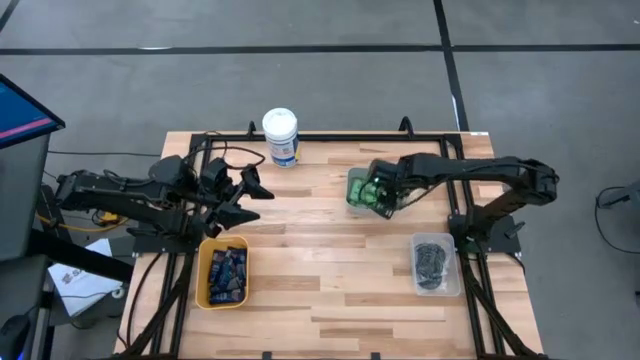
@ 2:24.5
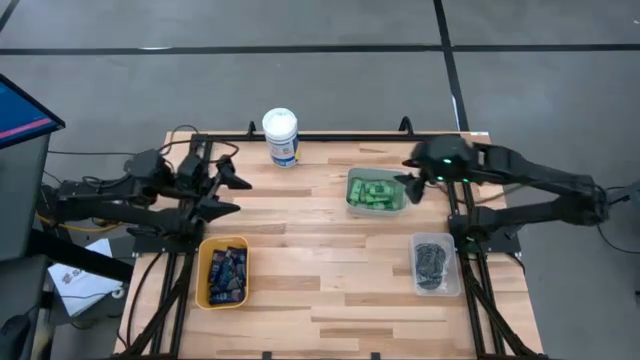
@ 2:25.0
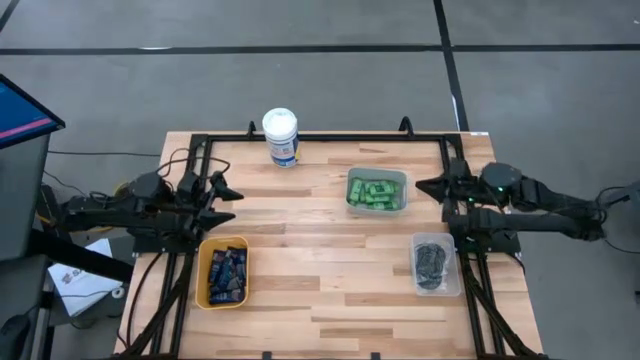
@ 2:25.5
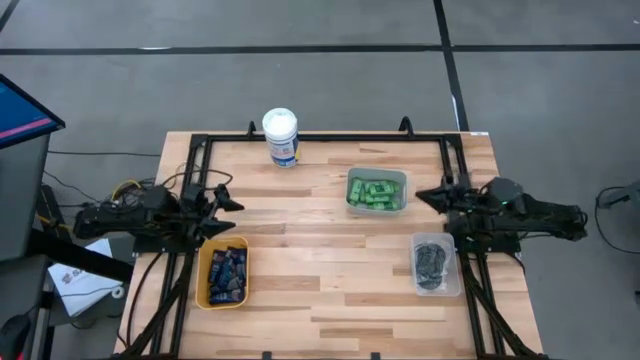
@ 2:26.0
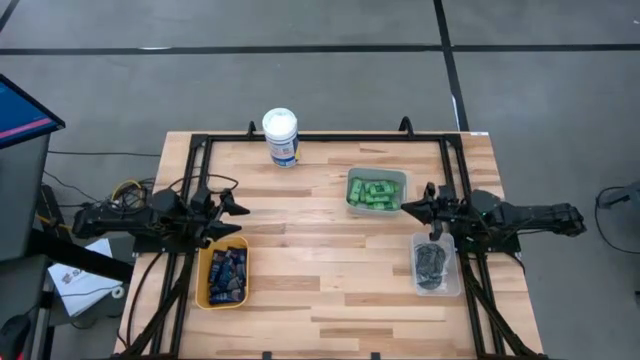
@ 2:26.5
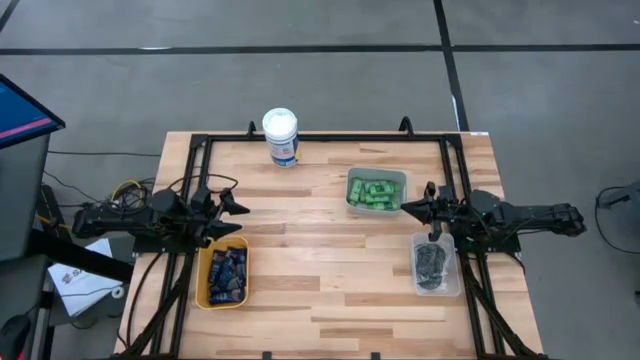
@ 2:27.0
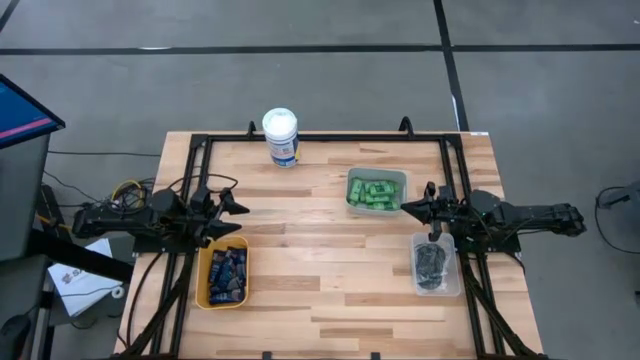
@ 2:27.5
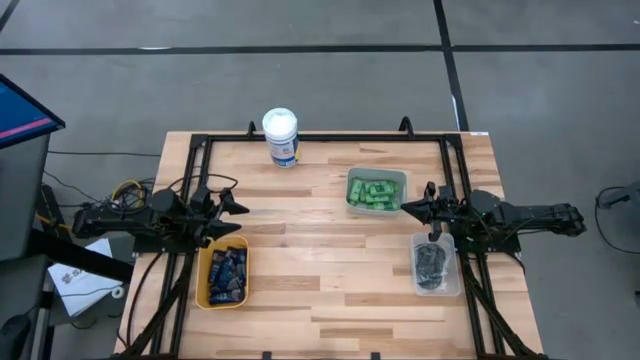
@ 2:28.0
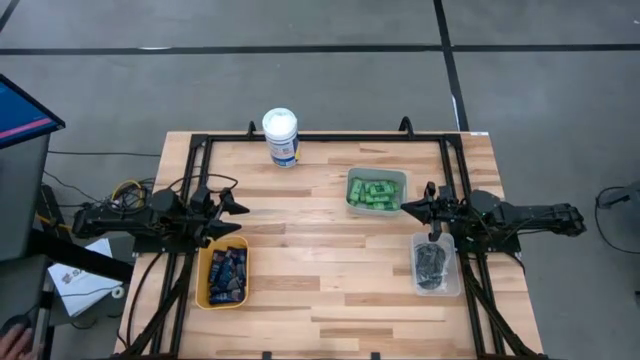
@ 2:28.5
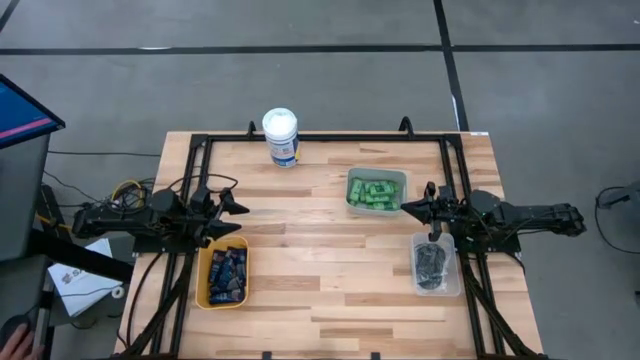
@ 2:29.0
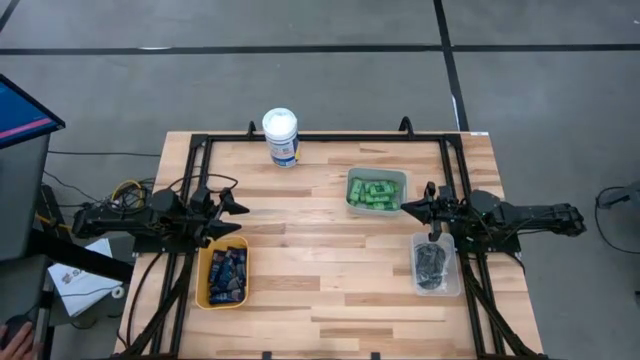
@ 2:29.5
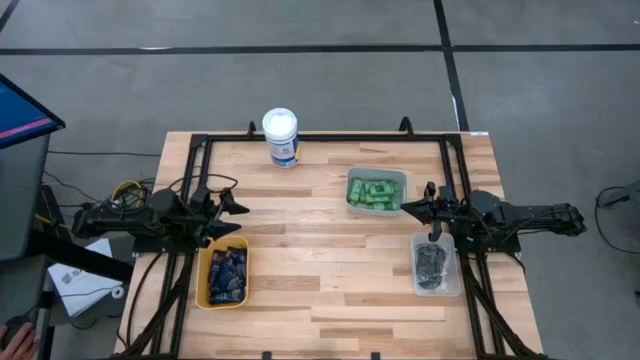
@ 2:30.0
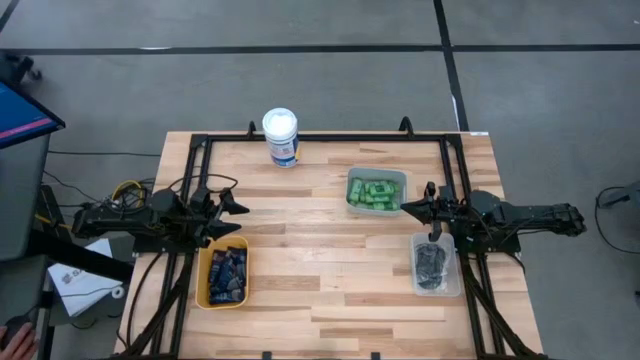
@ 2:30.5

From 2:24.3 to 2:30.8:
Task: Pick & Place Travel size toiletries
Return to Home Position

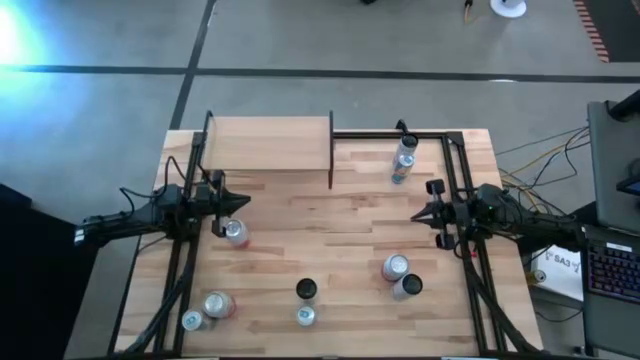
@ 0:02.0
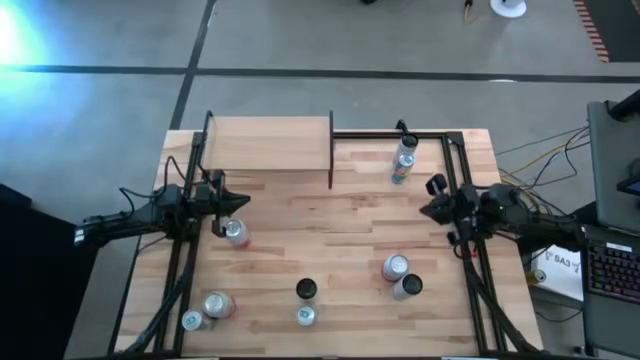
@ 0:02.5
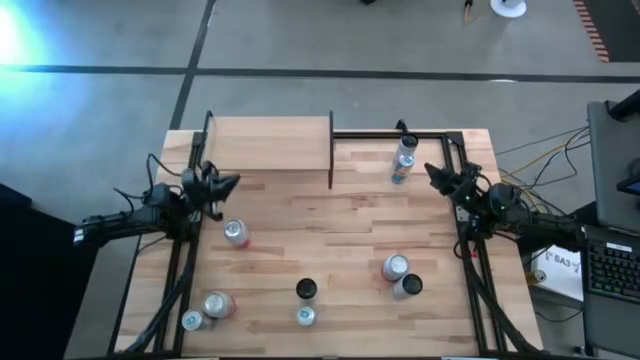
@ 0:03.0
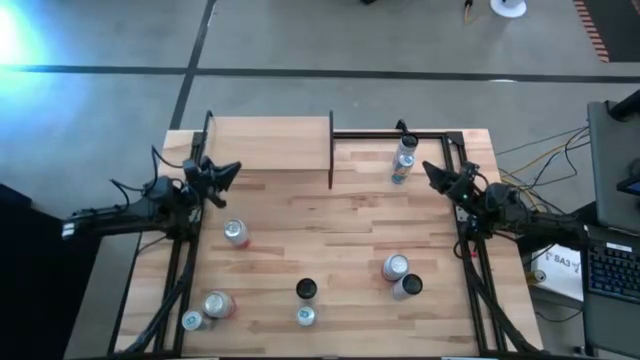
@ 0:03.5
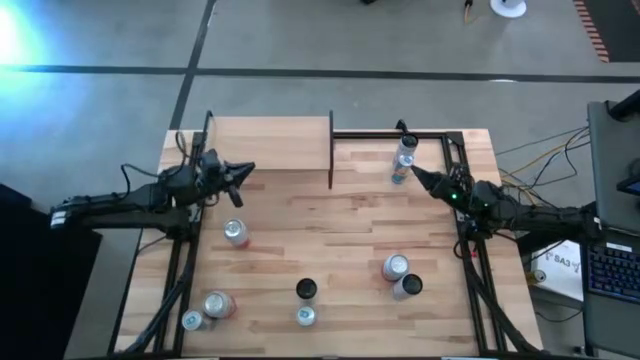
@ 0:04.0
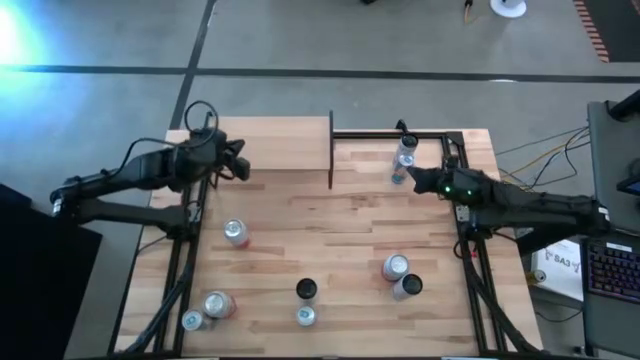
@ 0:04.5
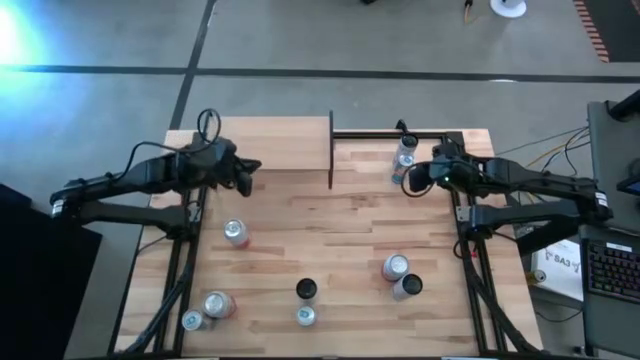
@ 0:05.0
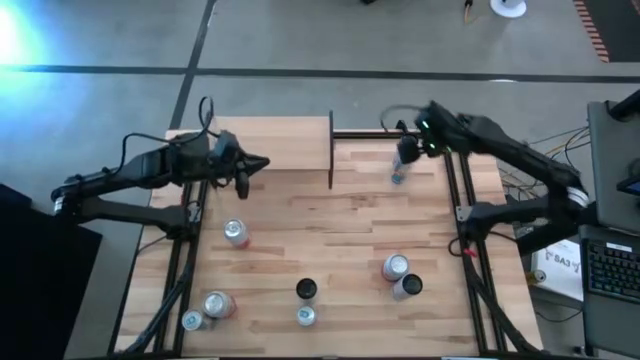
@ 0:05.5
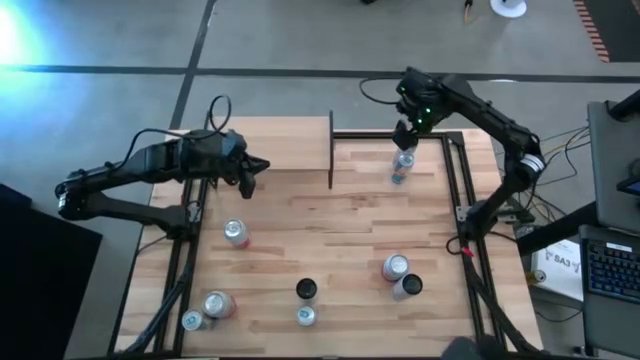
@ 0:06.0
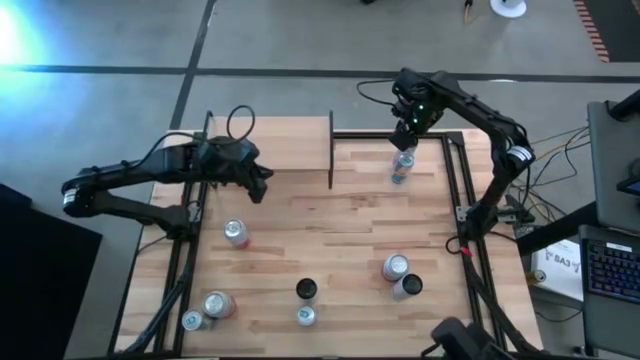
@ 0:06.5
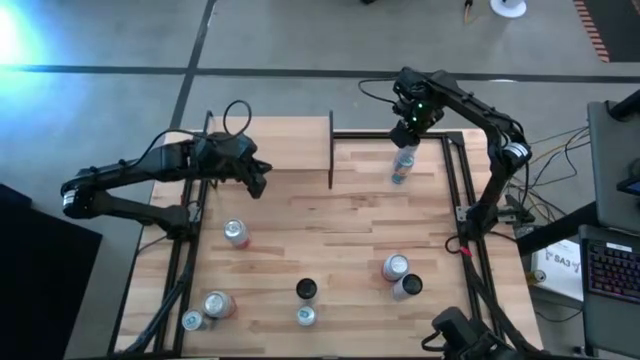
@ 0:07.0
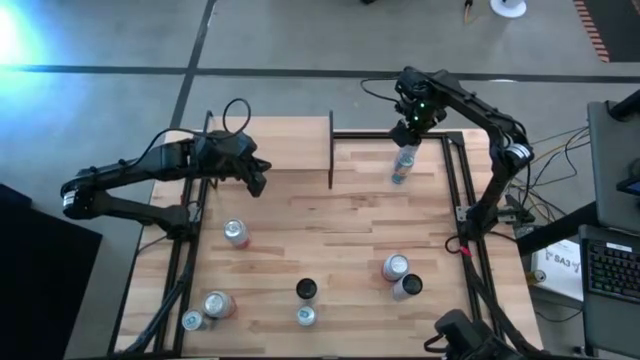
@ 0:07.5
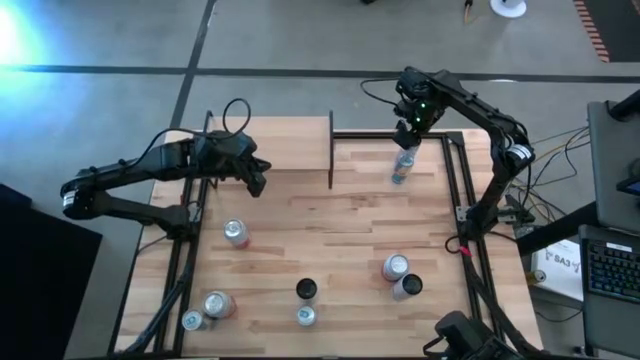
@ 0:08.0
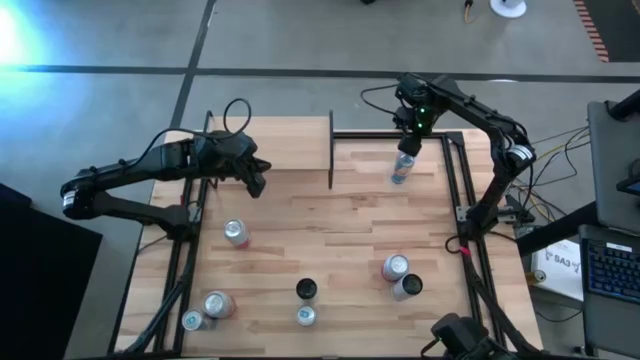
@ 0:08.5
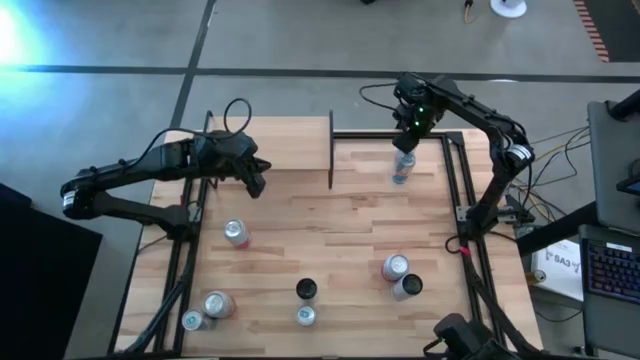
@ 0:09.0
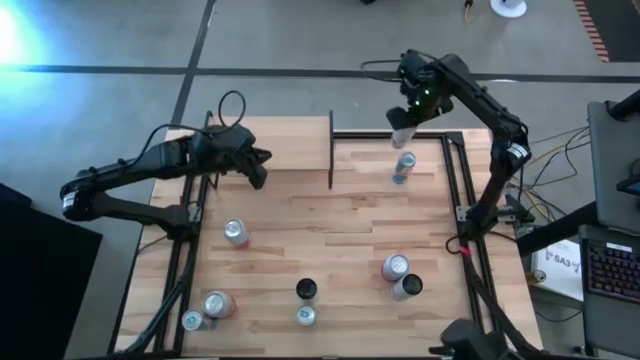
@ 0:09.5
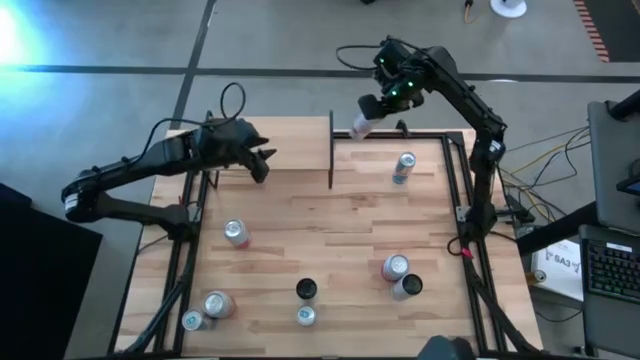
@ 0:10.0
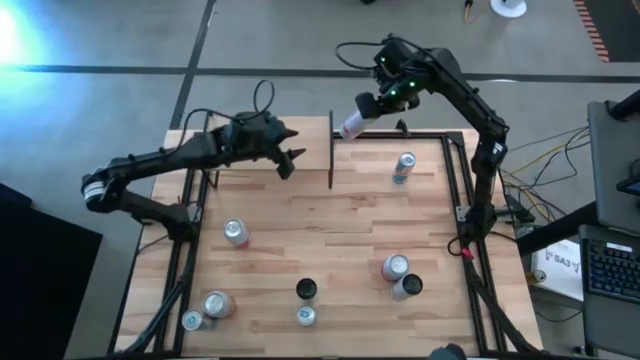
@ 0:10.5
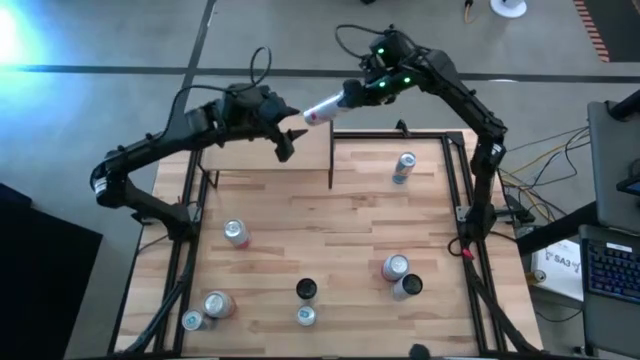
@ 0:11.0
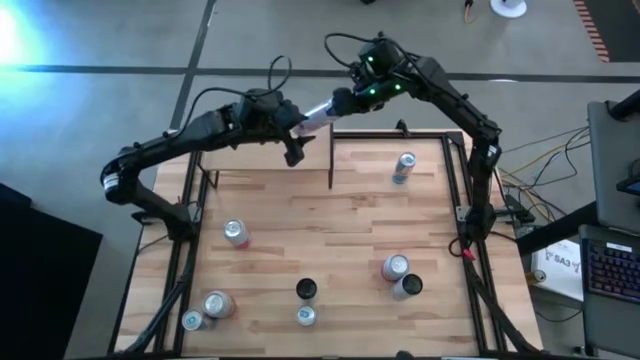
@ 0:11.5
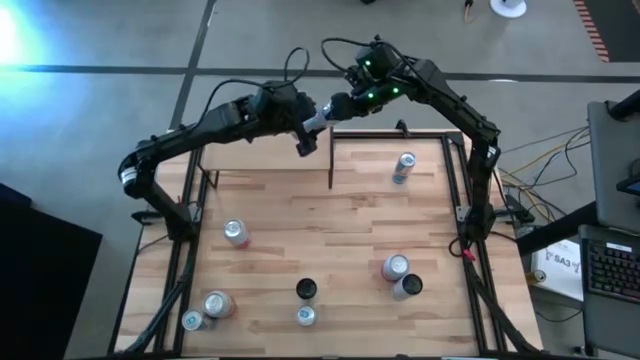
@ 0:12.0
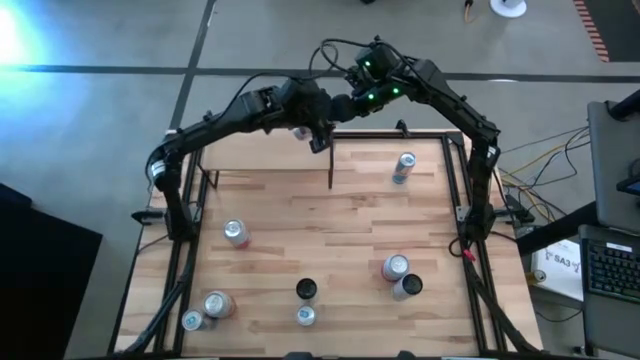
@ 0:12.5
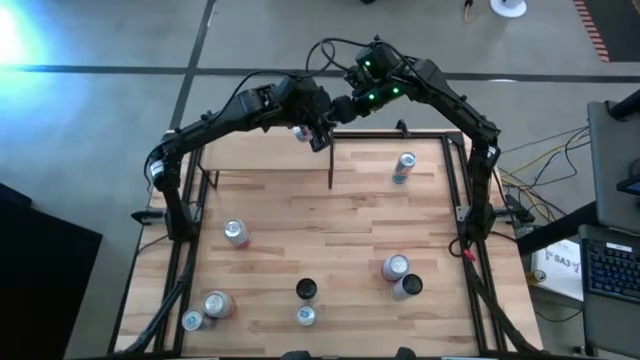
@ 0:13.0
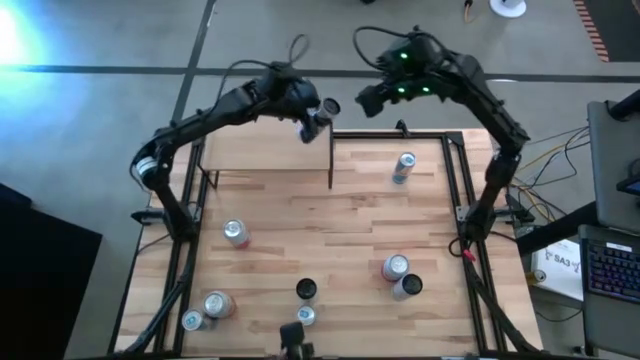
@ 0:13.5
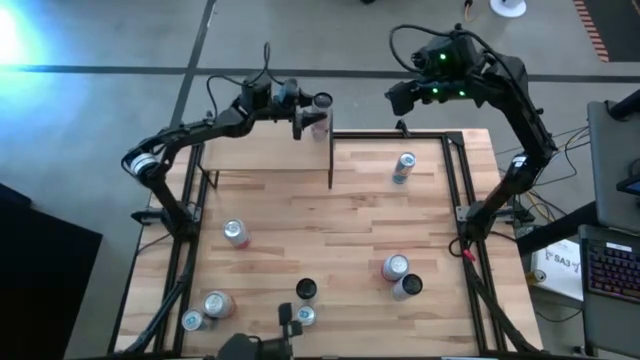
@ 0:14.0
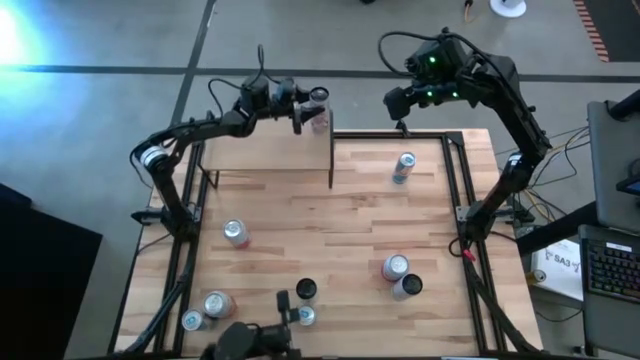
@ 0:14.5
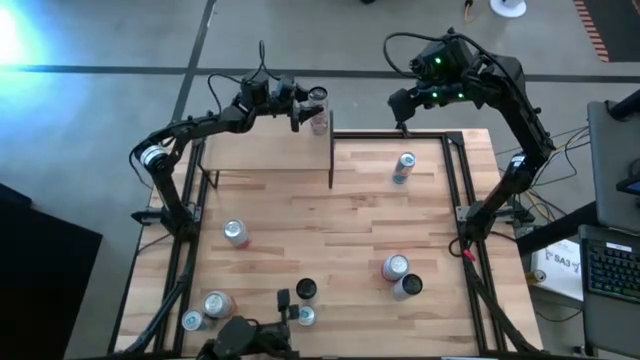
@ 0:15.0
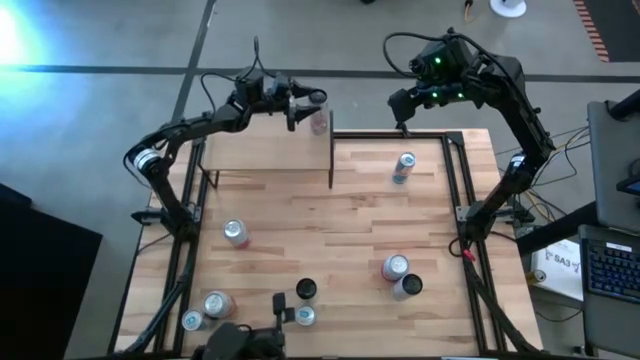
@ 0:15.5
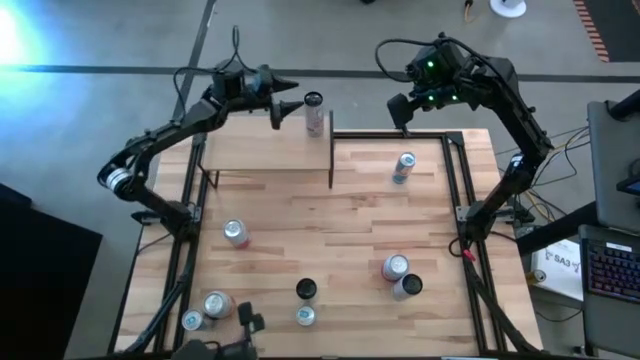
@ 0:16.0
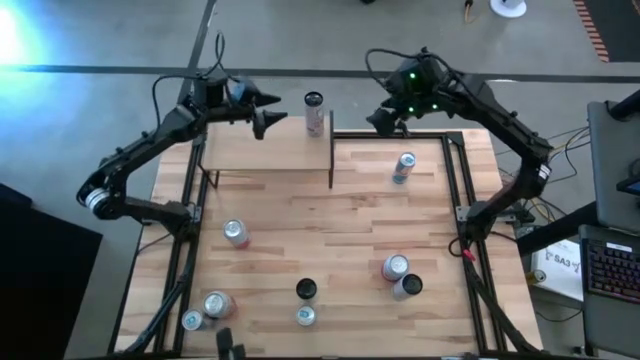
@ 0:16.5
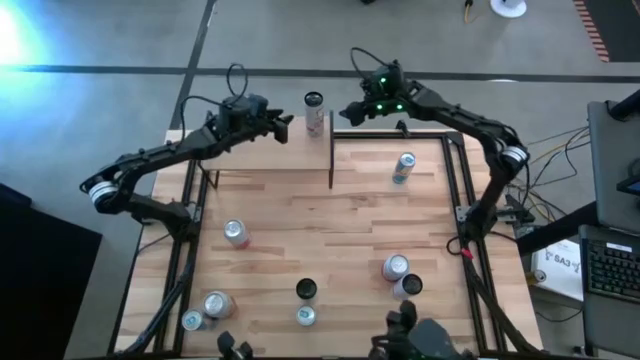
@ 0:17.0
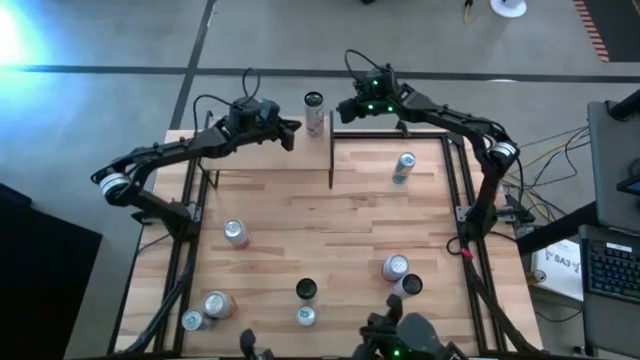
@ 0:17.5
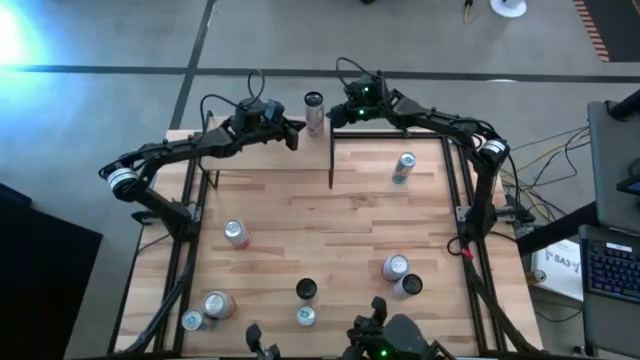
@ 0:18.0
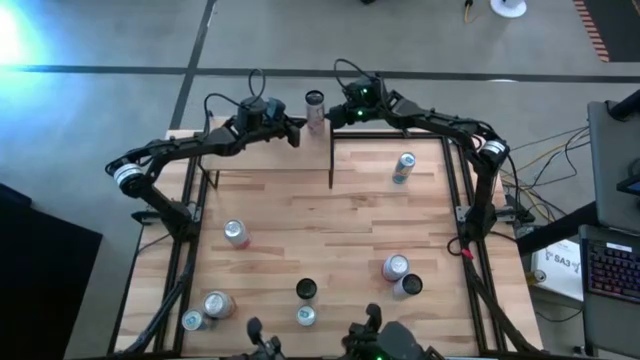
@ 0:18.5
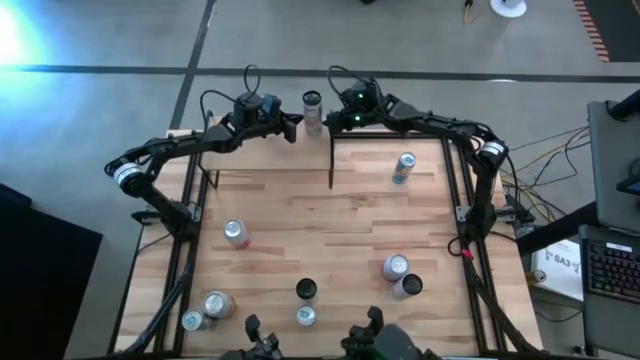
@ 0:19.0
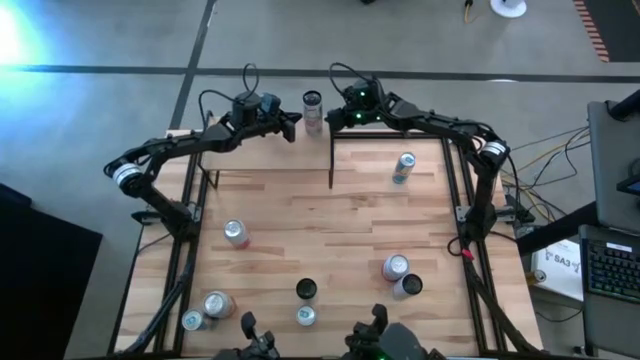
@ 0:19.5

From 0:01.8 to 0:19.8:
Task: Place canned beverage on shelf
Put the top right white-pink soda can on the shelf
